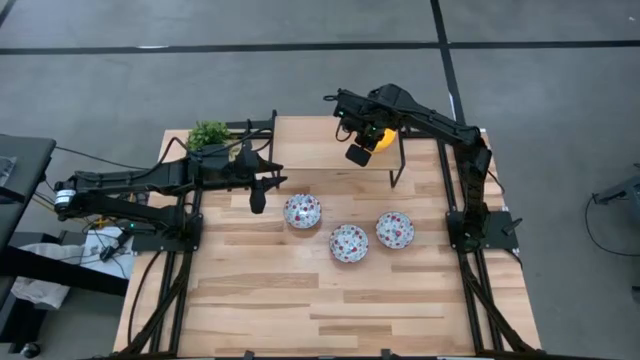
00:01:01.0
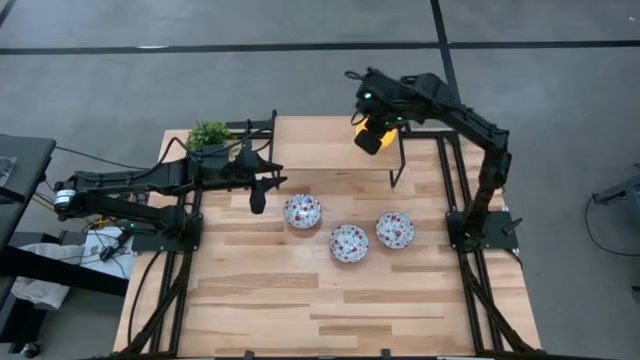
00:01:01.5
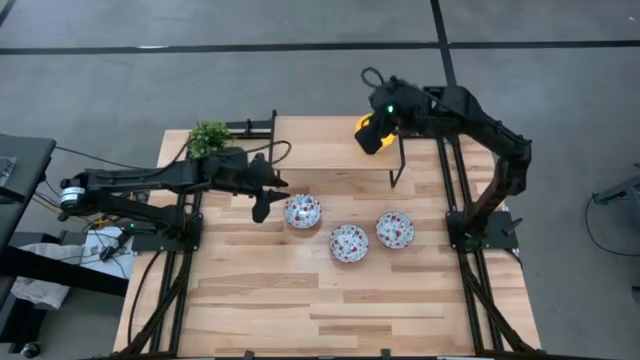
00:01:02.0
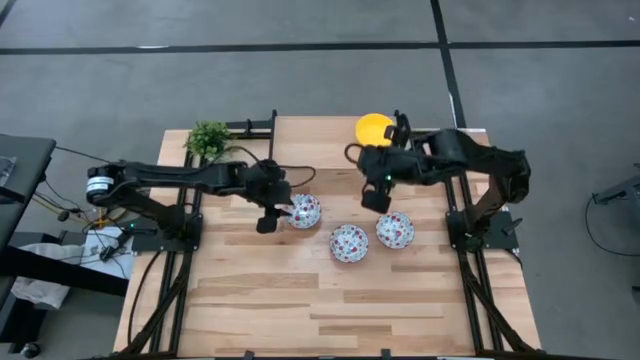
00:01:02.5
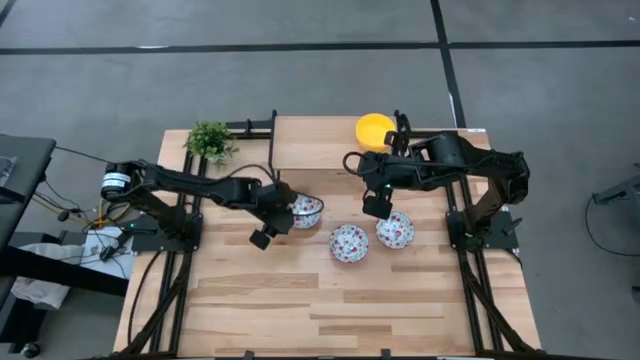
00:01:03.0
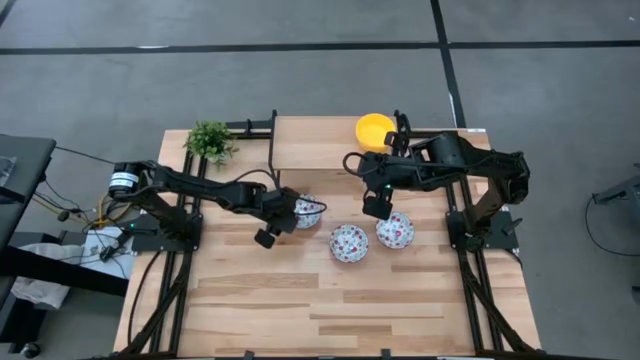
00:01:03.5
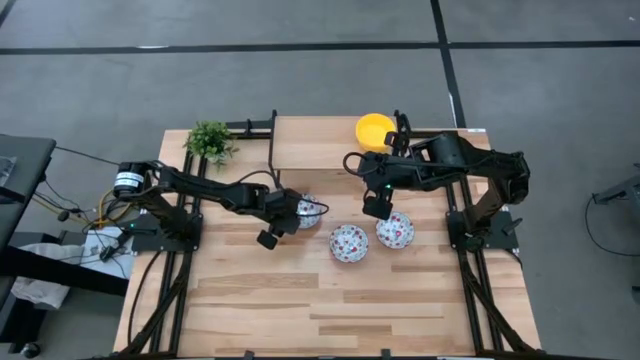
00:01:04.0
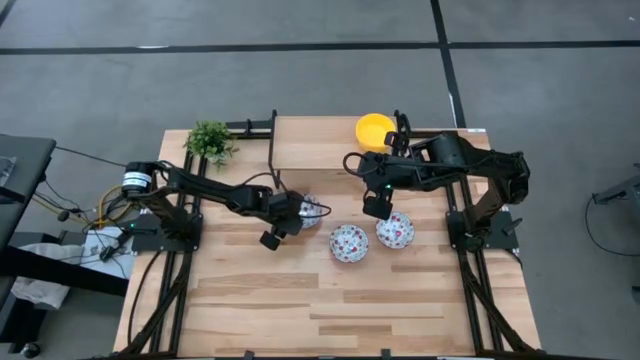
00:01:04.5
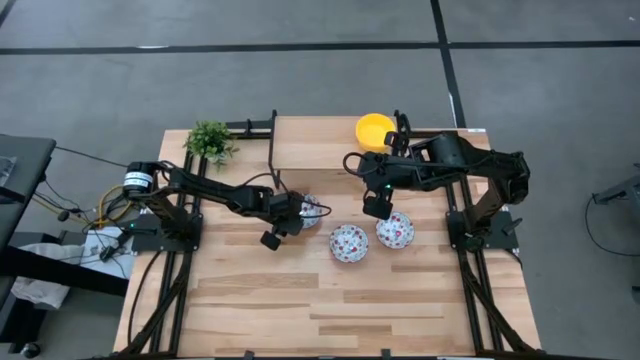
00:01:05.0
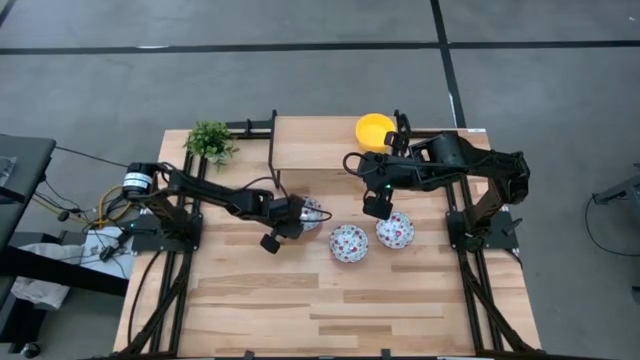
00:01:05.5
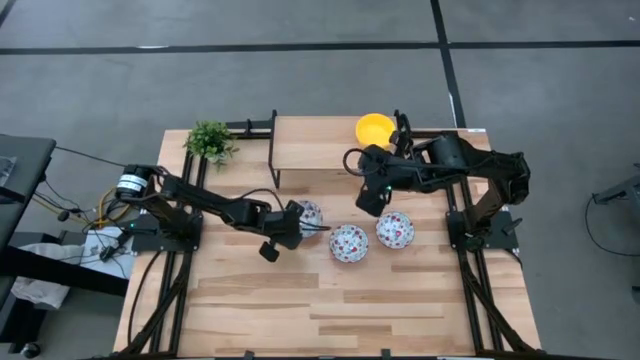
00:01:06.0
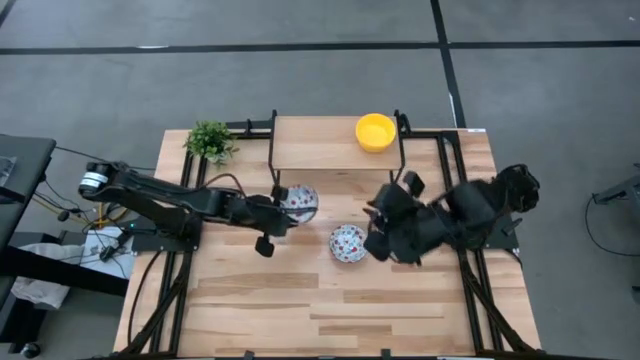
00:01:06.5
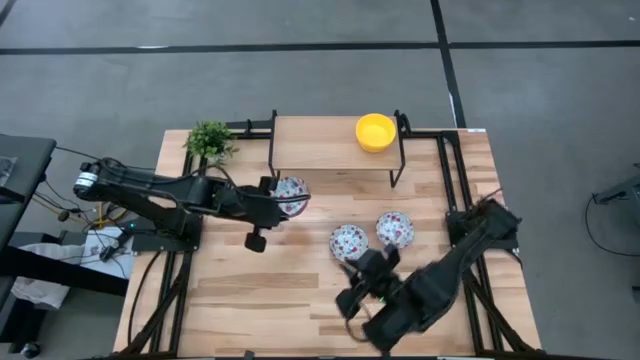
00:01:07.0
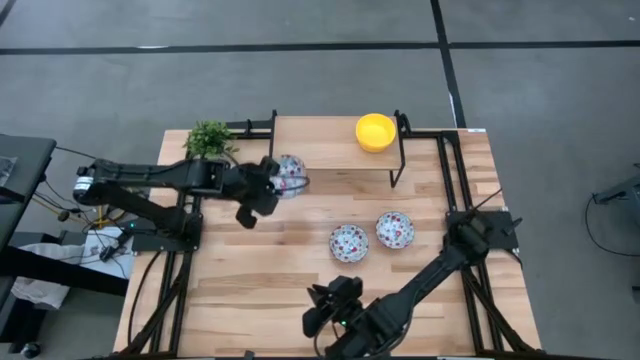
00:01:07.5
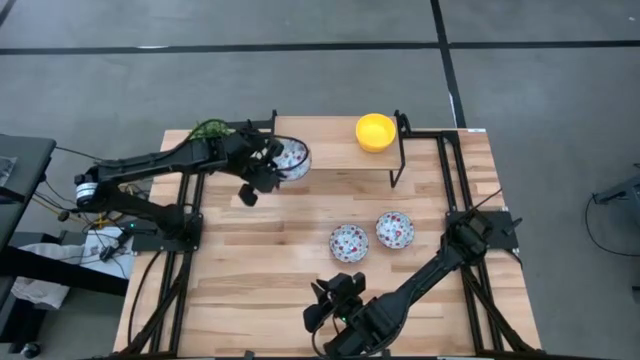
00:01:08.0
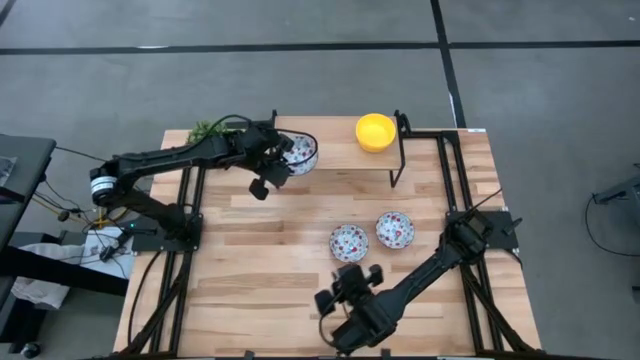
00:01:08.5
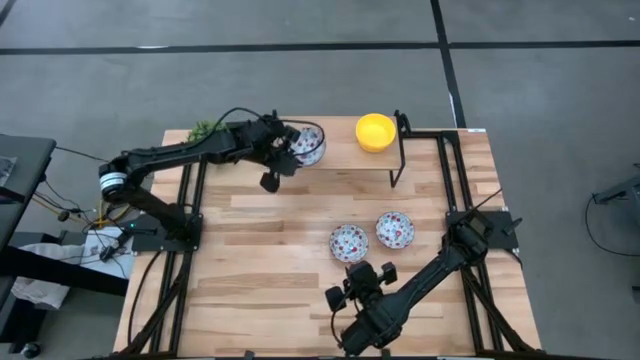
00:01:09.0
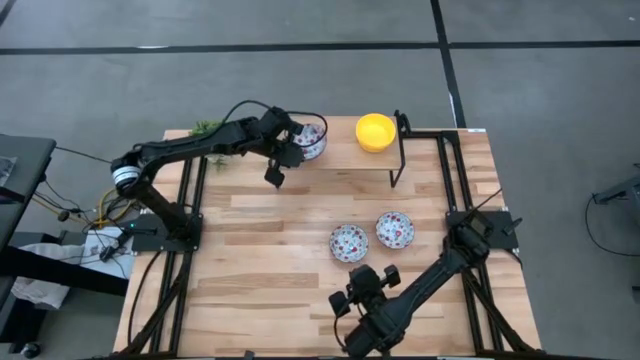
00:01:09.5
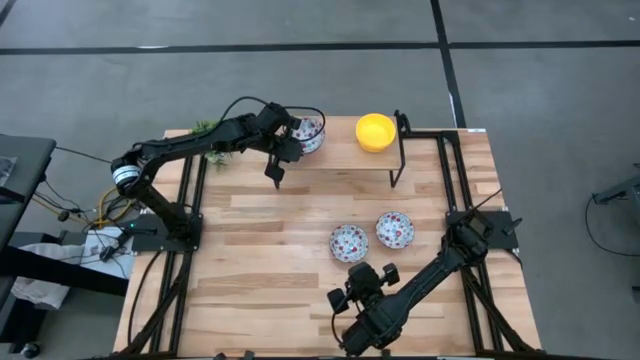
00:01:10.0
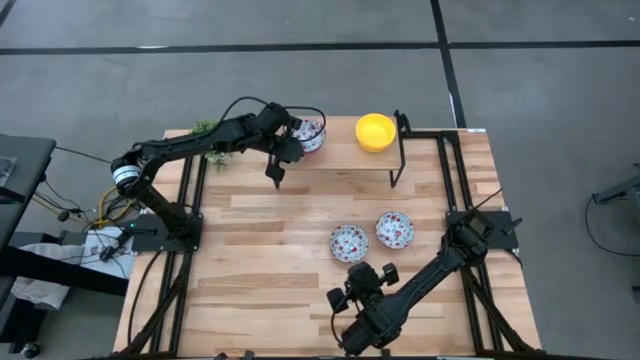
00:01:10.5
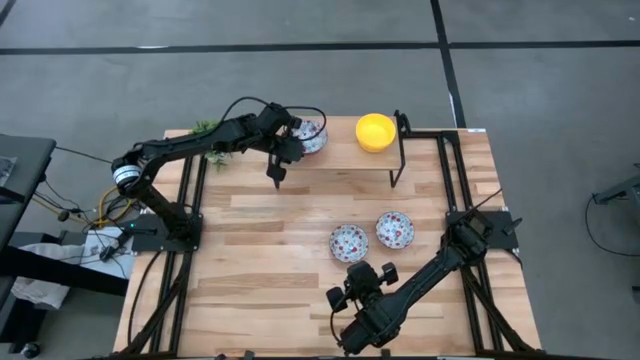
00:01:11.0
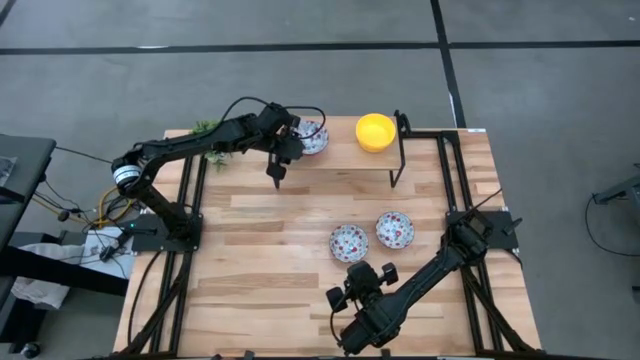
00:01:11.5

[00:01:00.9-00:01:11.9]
Task: Pick & Place Mini bowls
Put the patterned bowl on the shelf

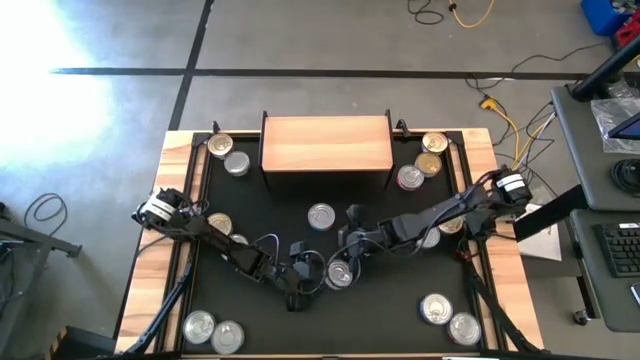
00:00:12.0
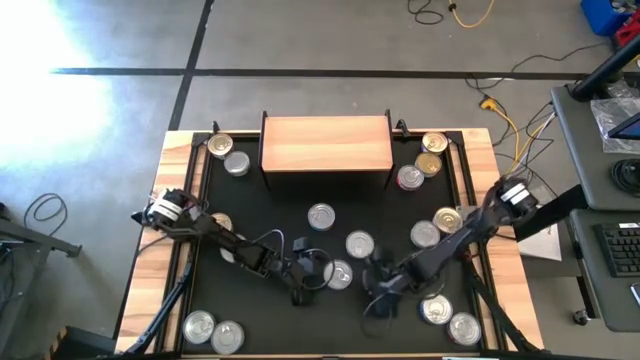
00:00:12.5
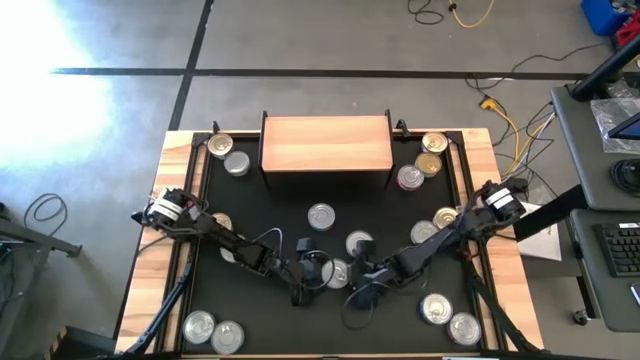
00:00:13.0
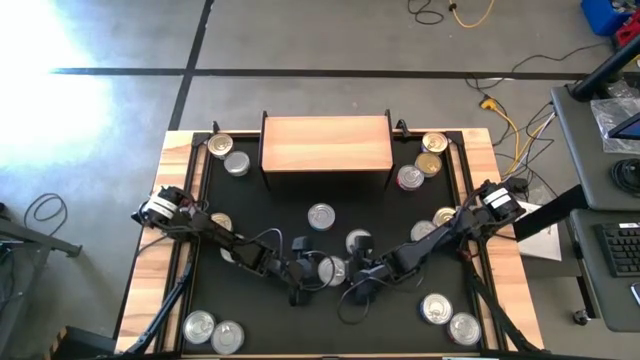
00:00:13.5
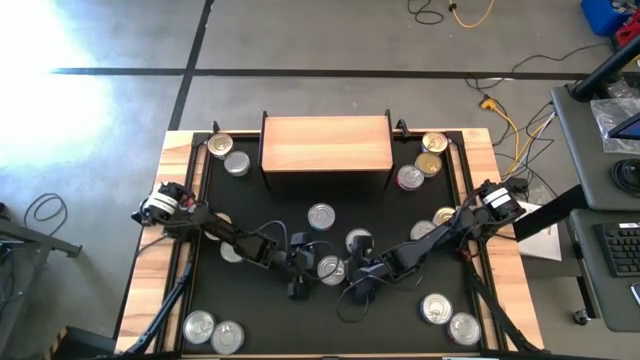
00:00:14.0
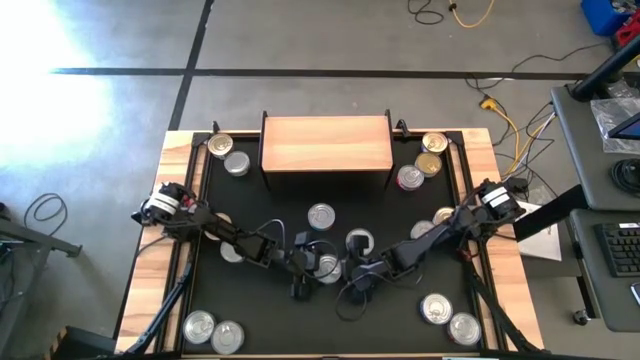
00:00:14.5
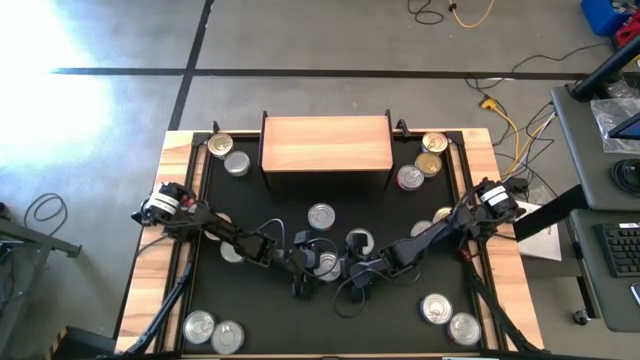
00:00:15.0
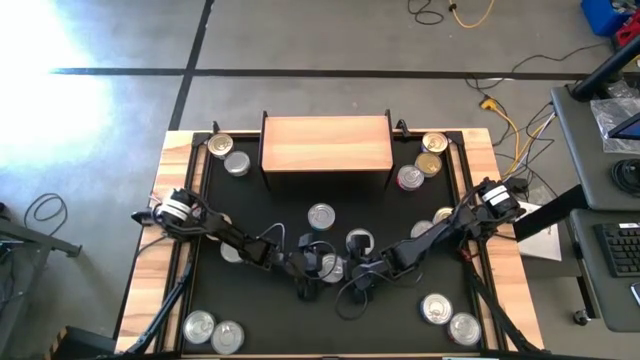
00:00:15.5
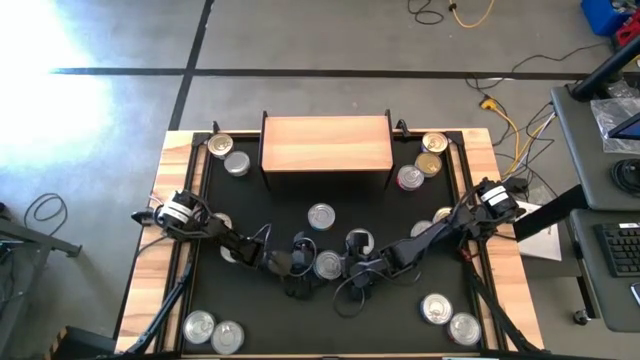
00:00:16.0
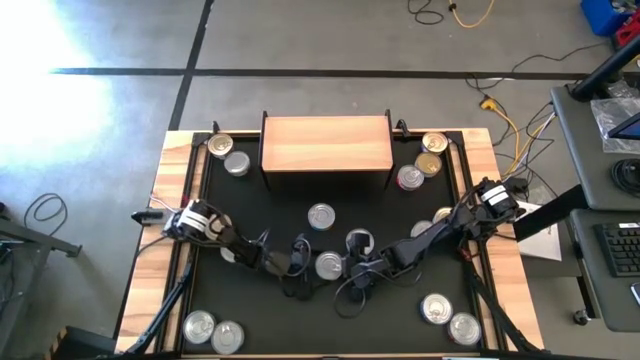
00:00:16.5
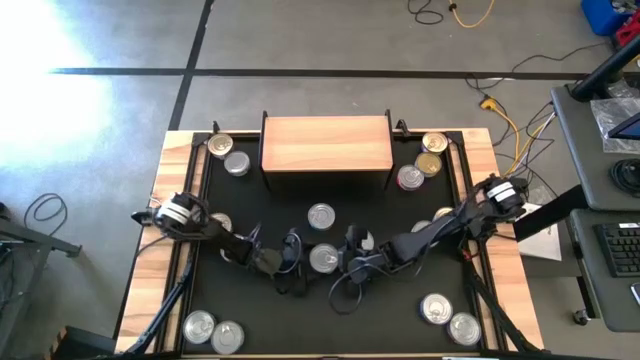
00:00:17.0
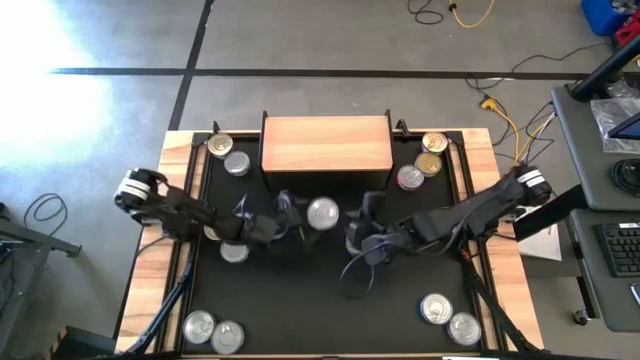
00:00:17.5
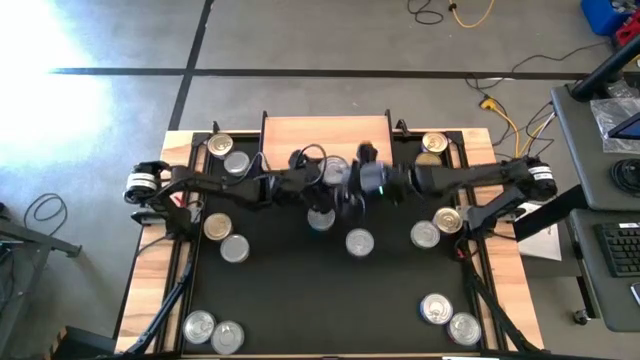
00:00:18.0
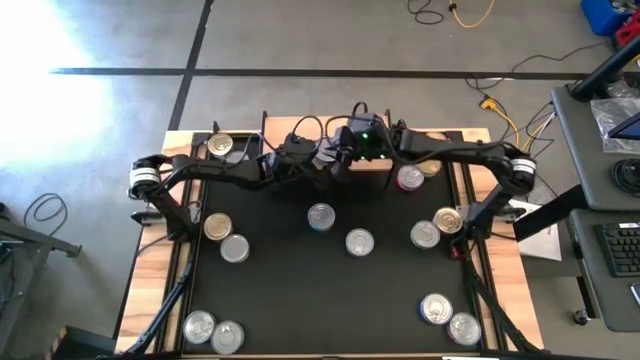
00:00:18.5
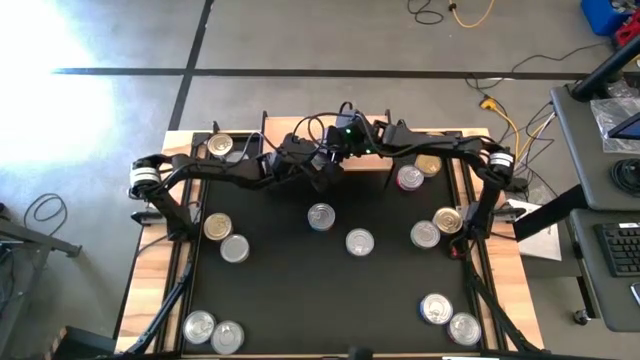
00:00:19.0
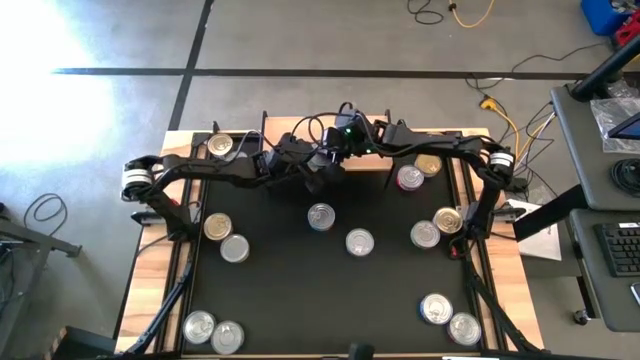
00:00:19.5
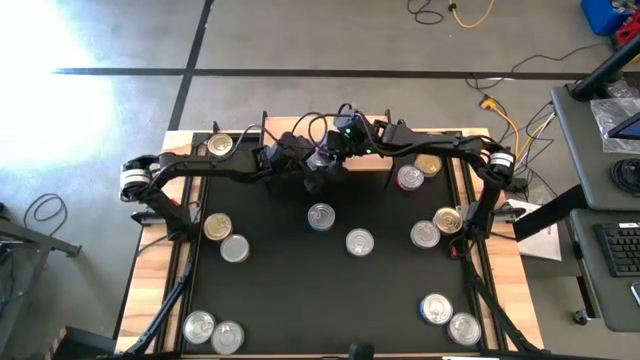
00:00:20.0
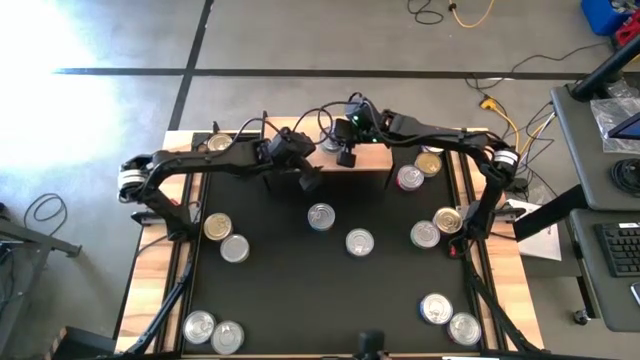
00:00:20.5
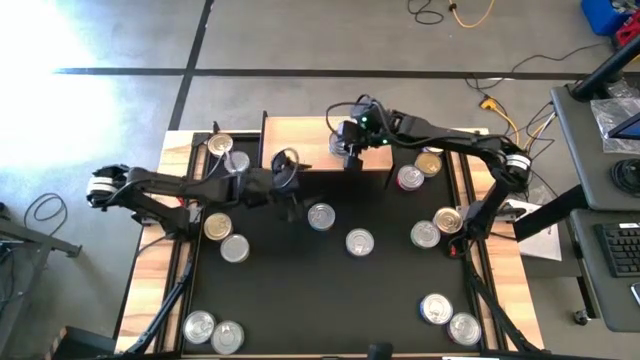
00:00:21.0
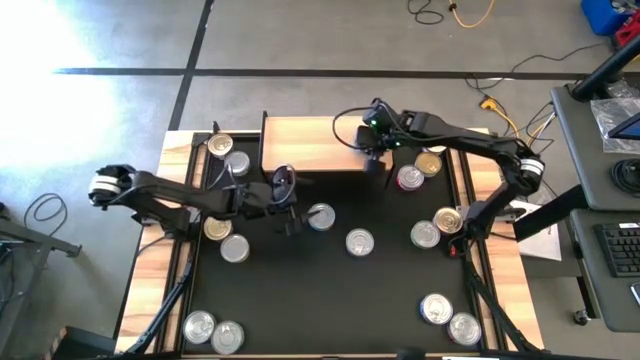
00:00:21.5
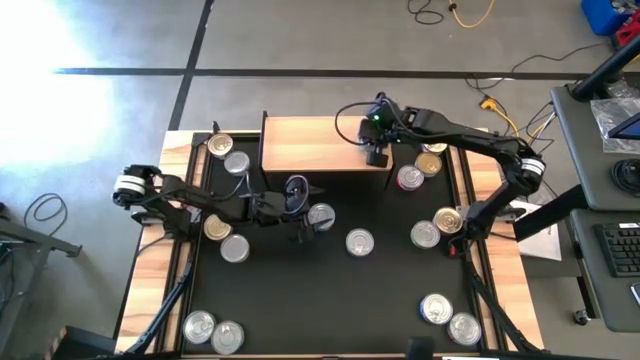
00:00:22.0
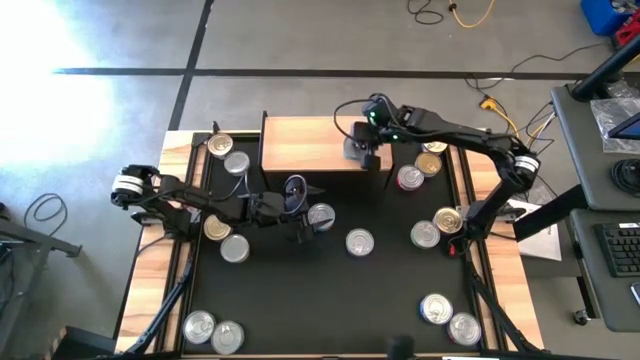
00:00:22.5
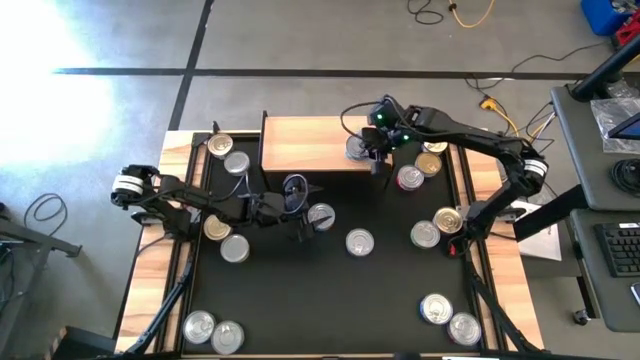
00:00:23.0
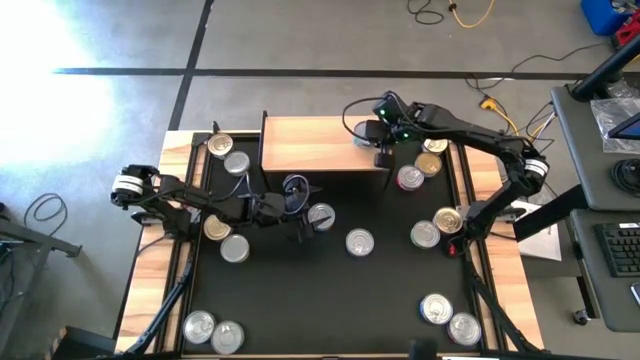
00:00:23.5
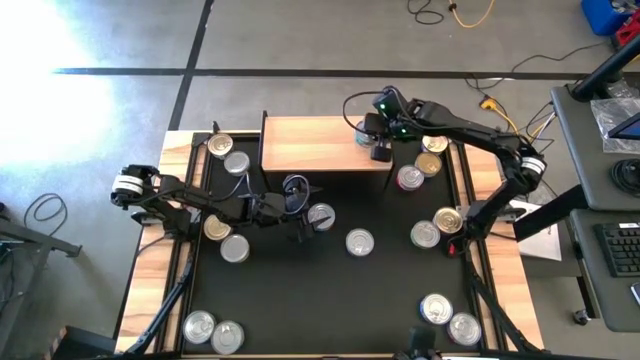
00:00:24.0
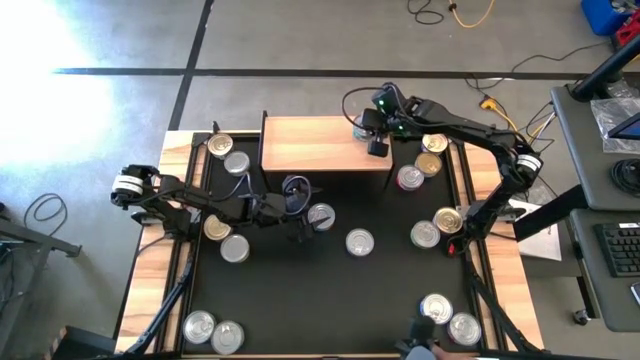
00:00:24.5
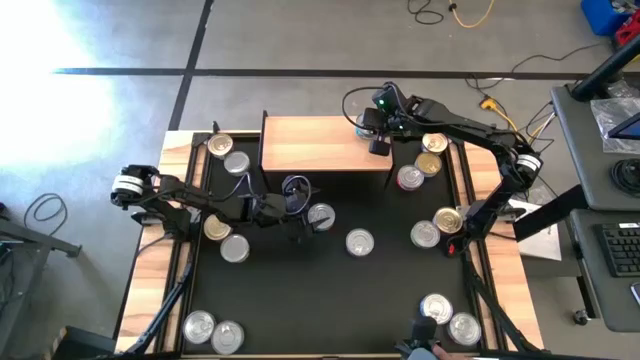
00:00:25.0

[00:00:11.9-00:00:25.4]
Task: Stack canned seafood by type on shelf
Put the top light blue tuna can on the shelf
